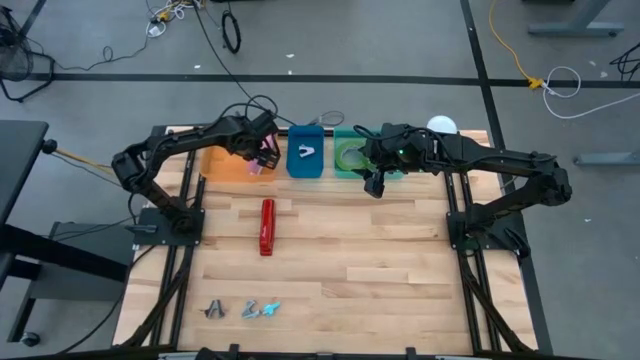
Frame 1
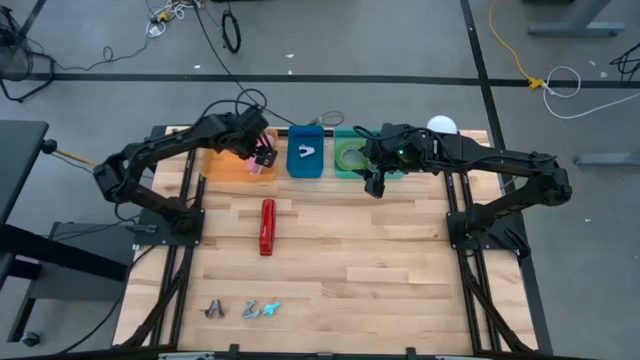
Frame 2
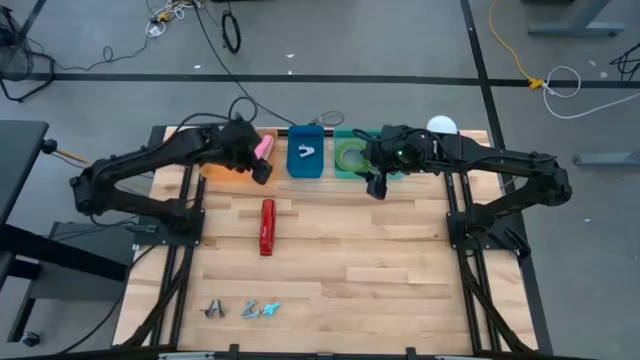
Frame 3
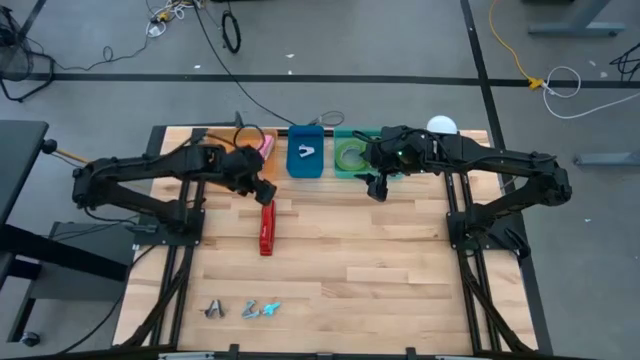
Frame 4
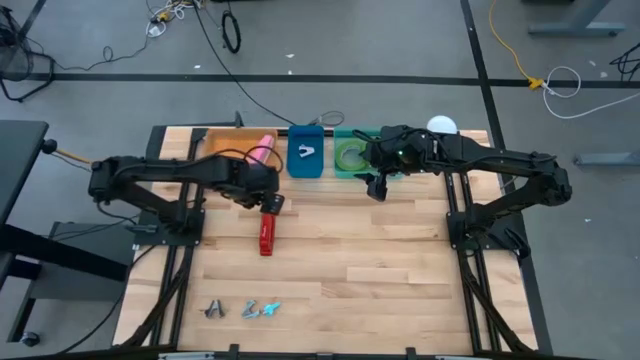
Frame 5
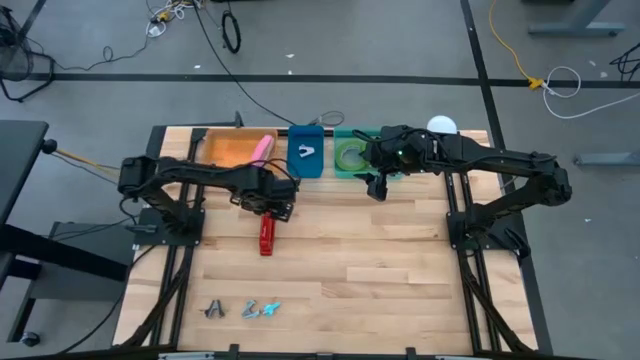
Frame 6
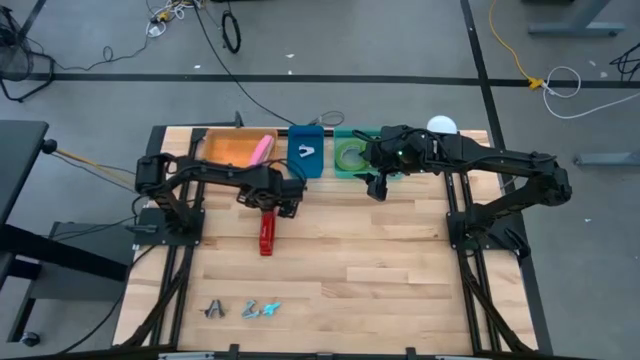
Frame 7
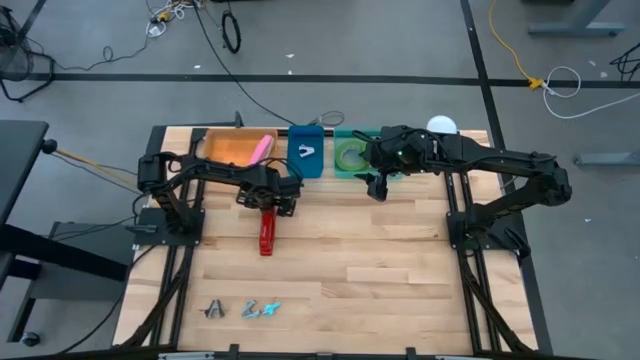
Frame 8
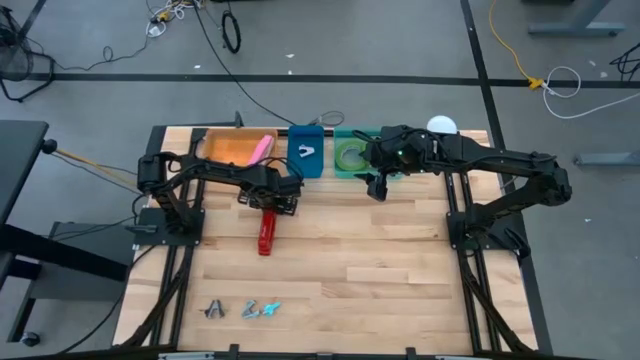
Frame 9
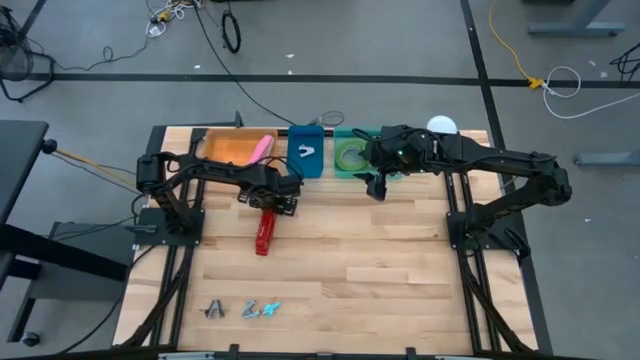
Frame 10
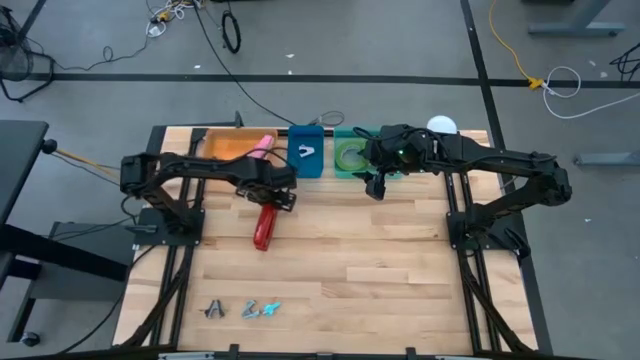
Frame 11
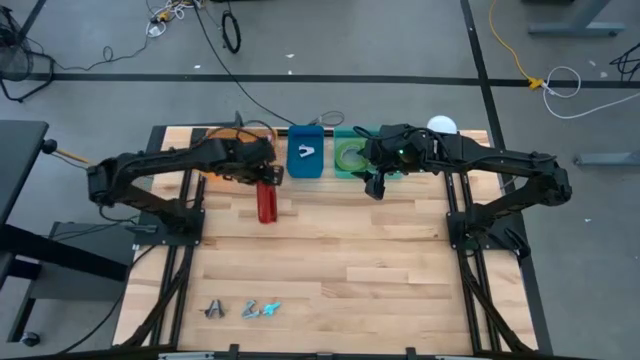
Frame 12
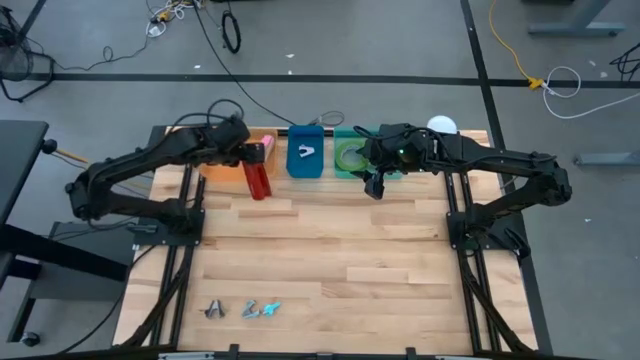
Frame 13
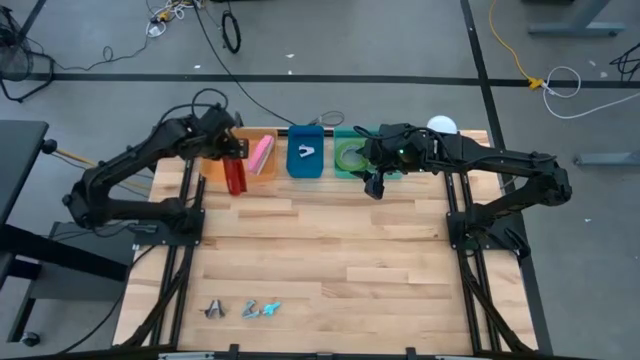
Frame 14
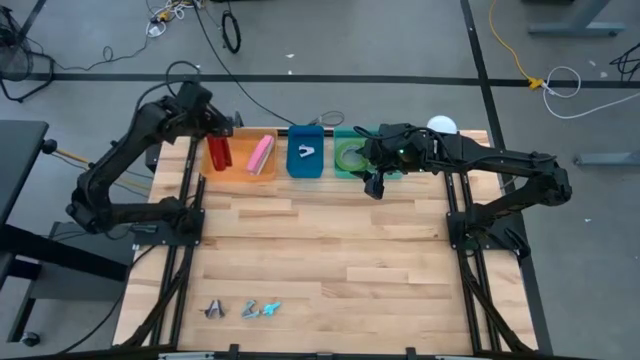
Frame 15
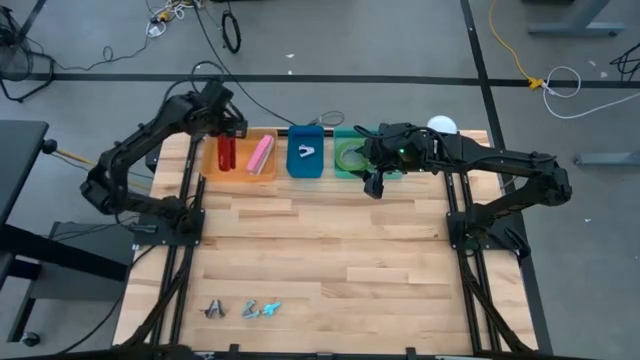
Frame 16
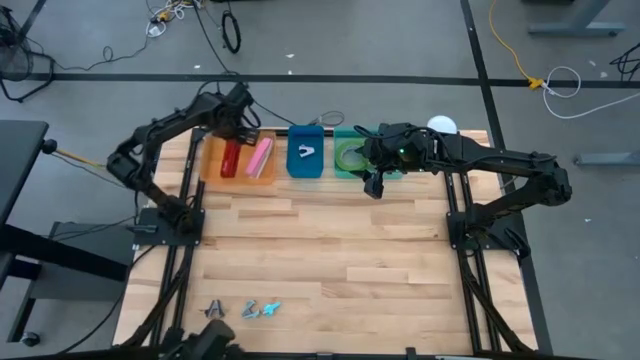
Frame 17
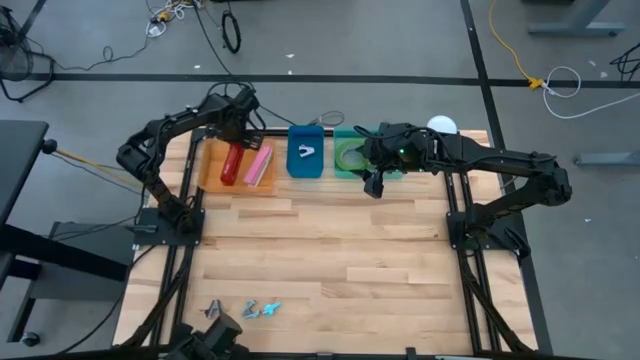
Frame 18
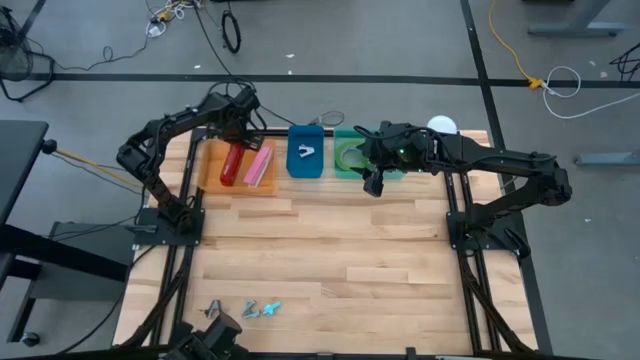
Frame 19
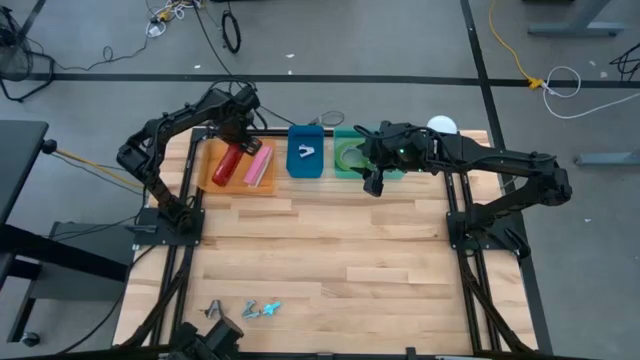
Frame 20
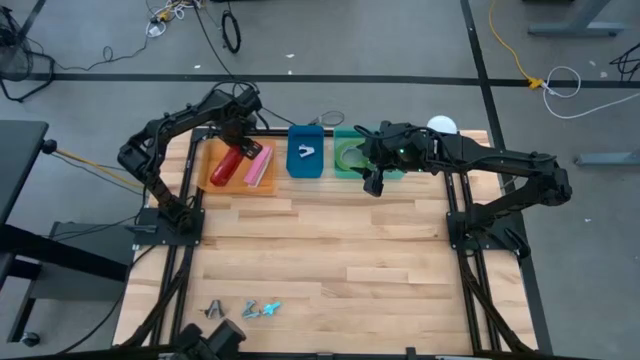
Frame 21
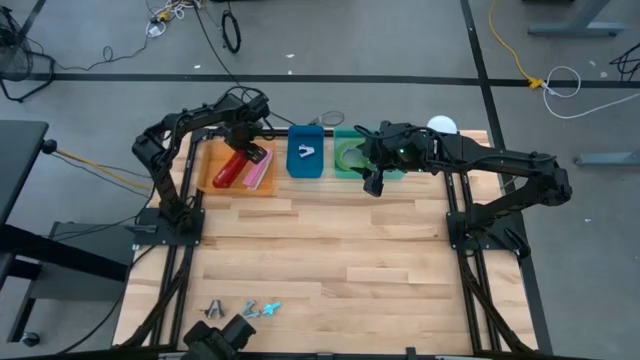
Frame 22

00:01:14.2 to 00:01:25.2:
Task: Pick and place Stapler, Stapler remover, tape
Put the red stapler into the orange bin

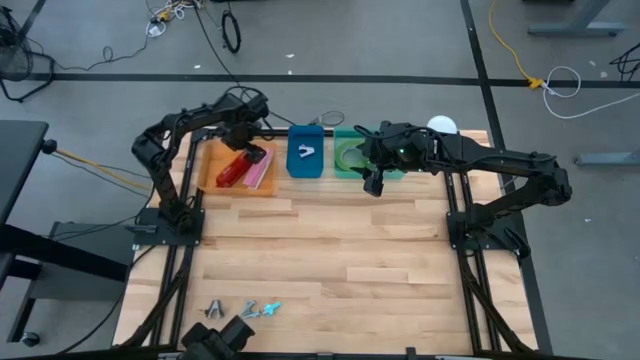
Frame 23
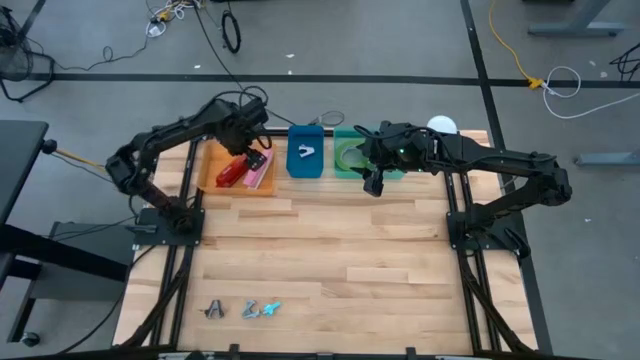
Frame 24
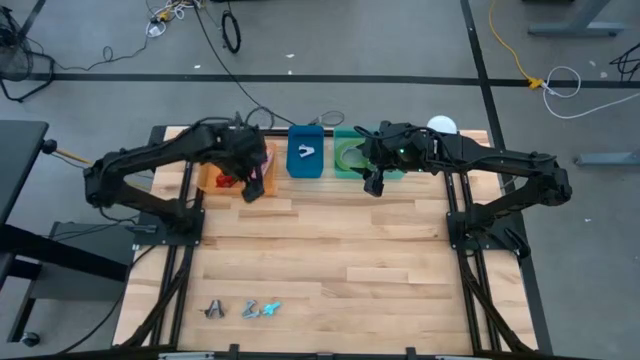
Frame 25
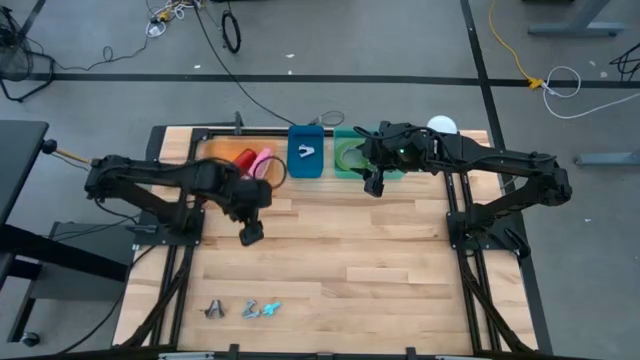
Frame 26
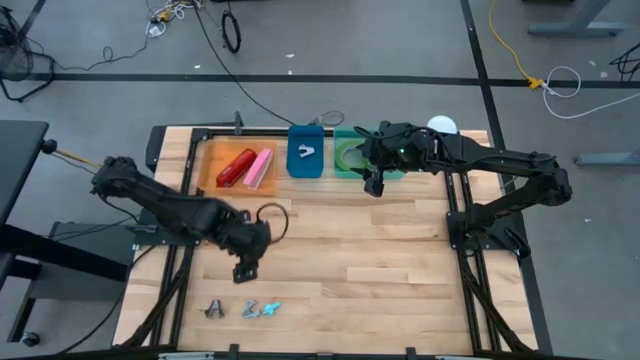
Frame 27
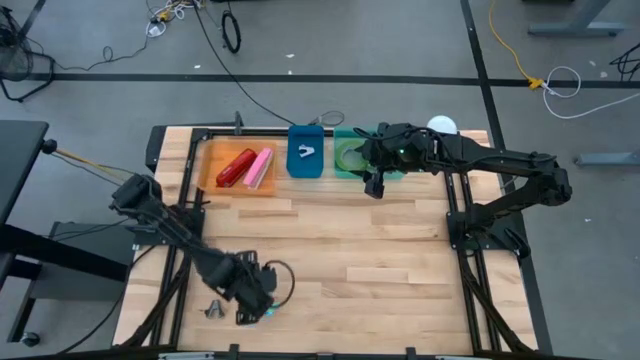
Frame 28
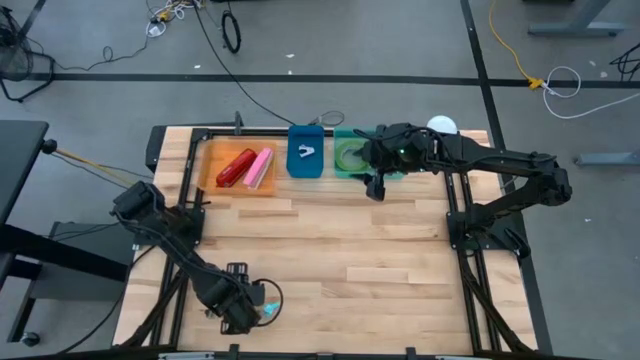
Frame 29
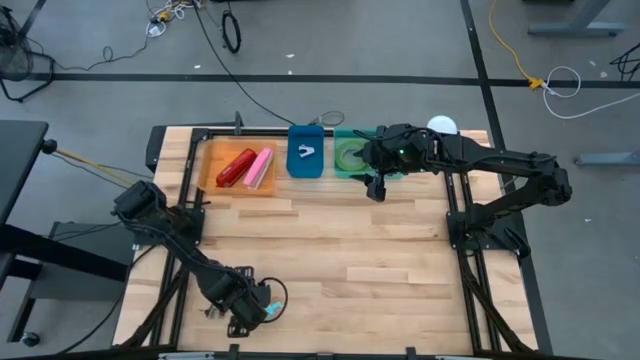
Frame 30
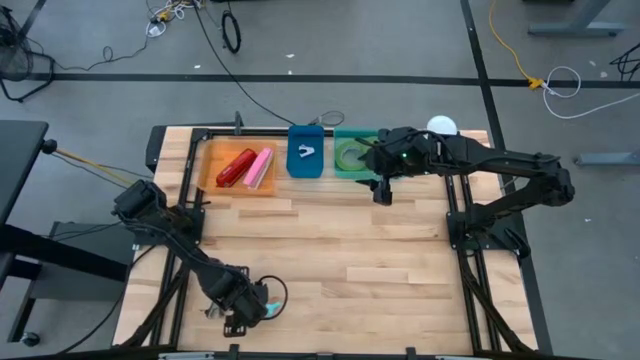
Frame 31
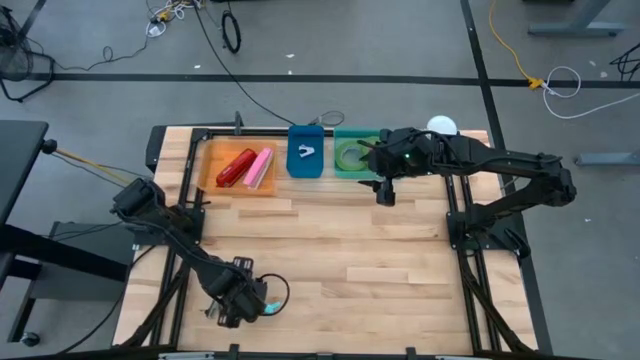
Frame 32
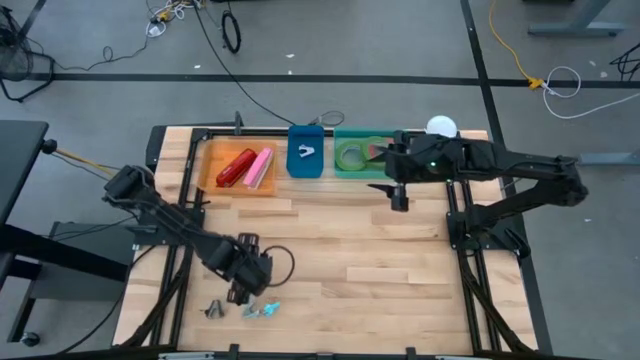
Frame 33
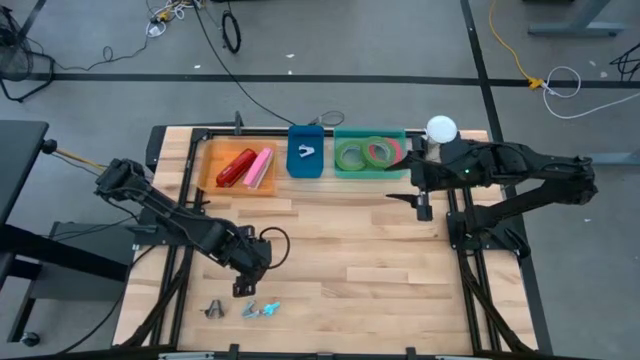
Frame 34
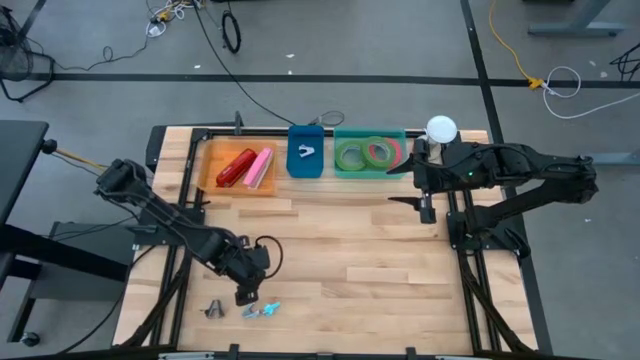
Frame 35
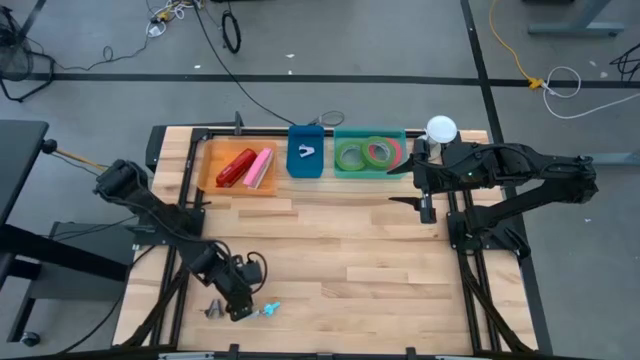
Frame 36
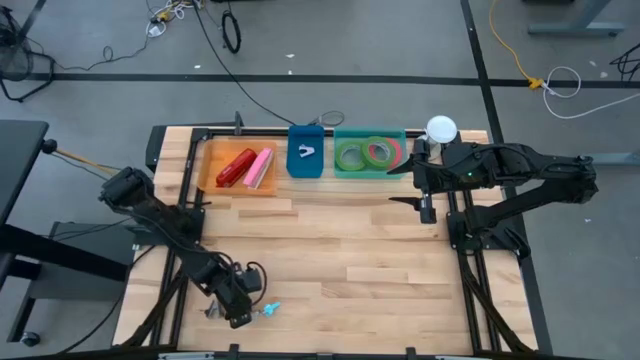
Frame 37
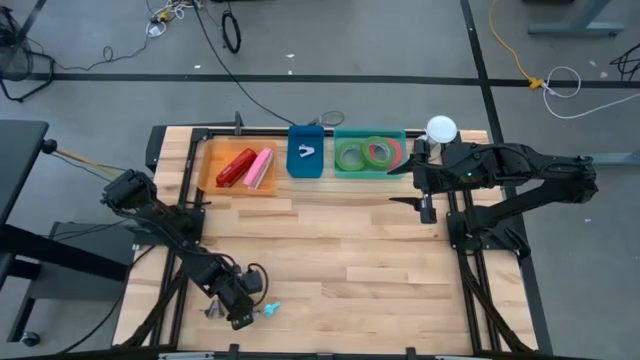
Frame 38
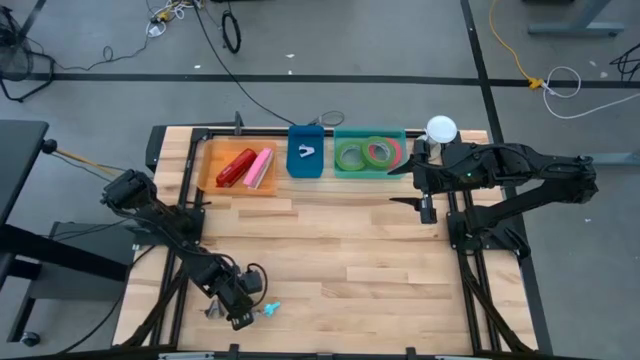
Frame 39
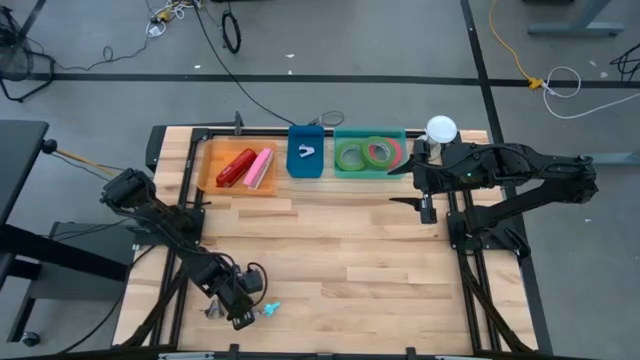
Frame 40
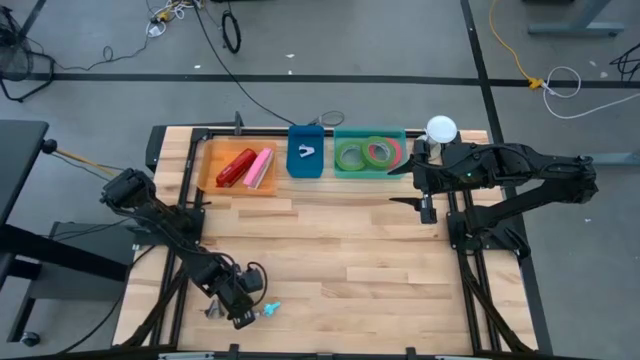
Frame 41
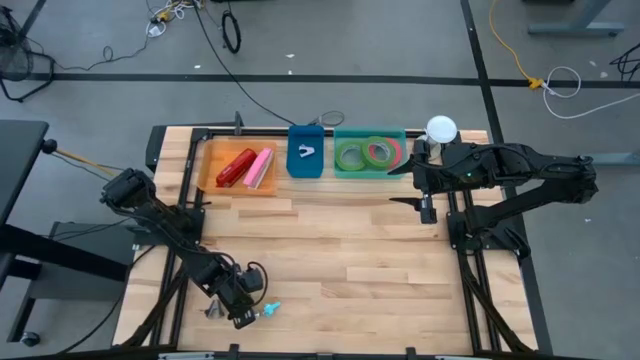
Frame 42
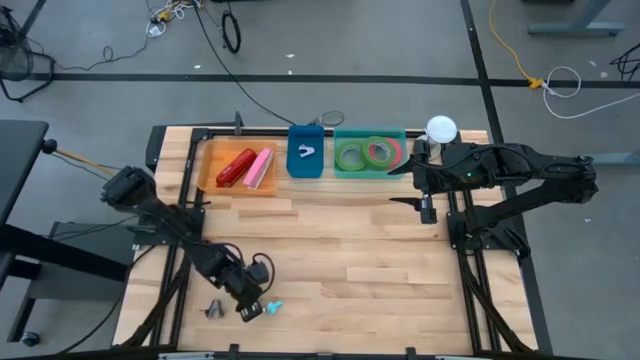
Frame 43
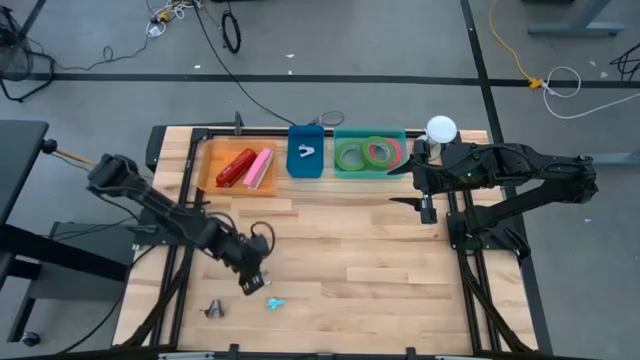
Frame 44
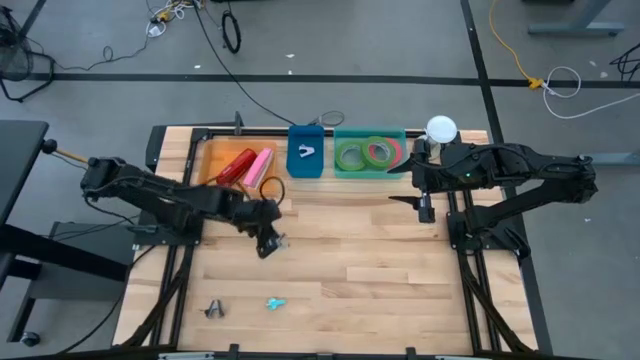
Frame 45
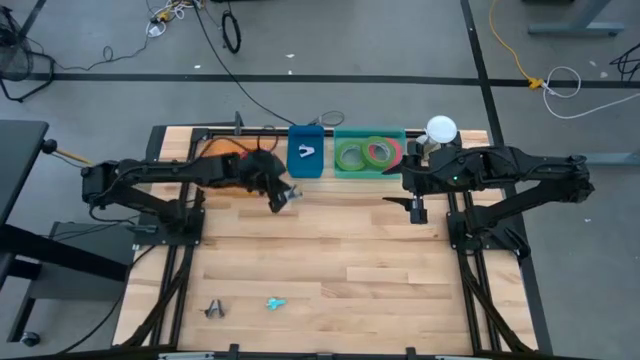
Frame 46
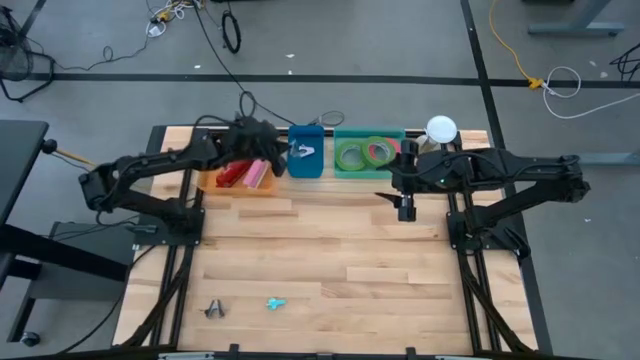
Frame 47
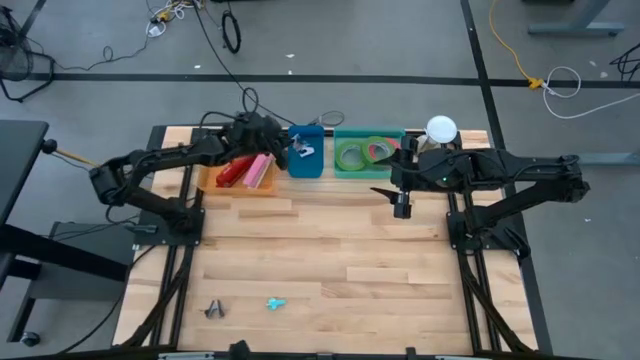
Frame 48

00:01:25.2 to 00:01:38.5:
Put the sky blue staple remover into the blue bin
